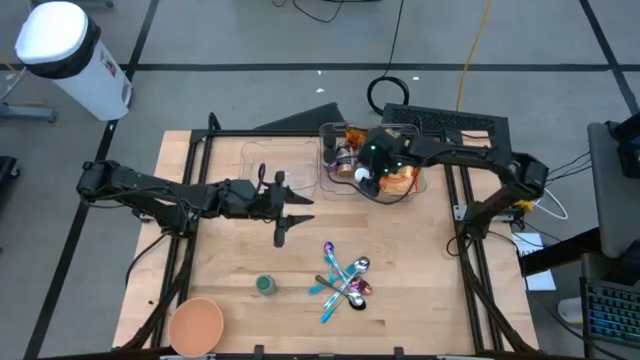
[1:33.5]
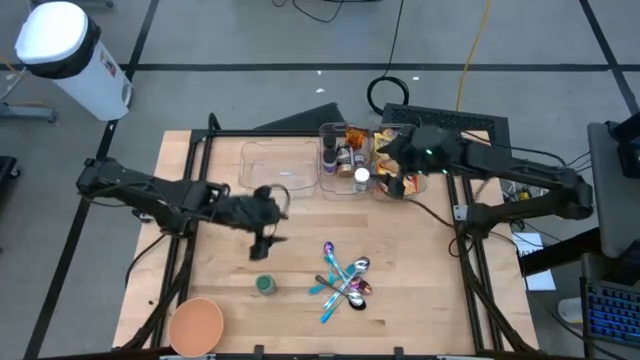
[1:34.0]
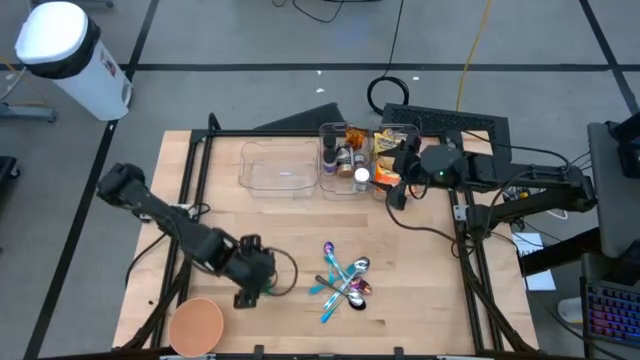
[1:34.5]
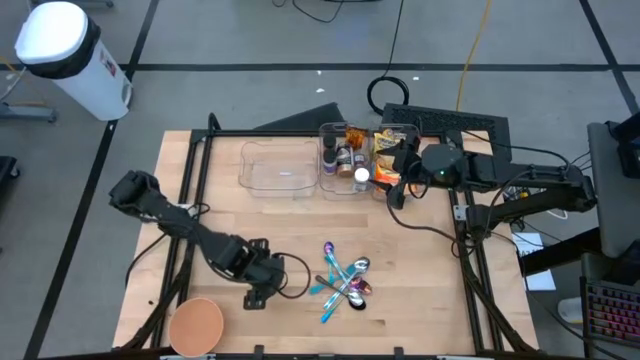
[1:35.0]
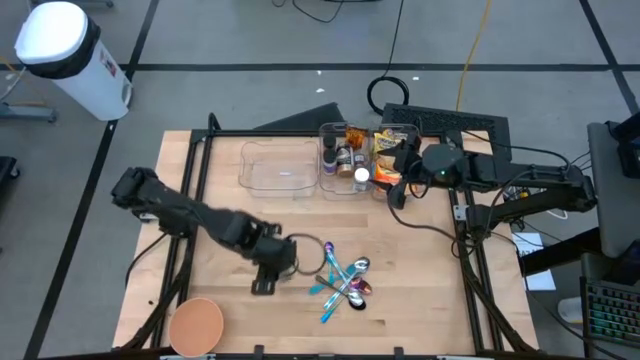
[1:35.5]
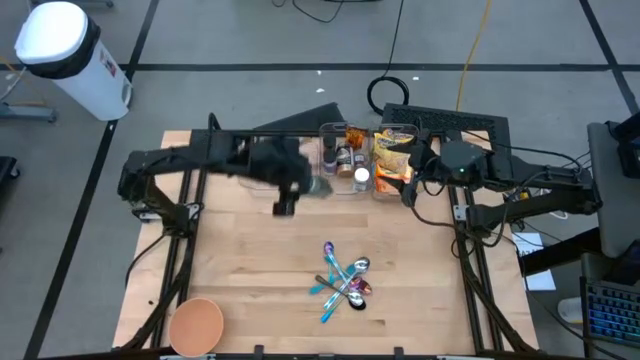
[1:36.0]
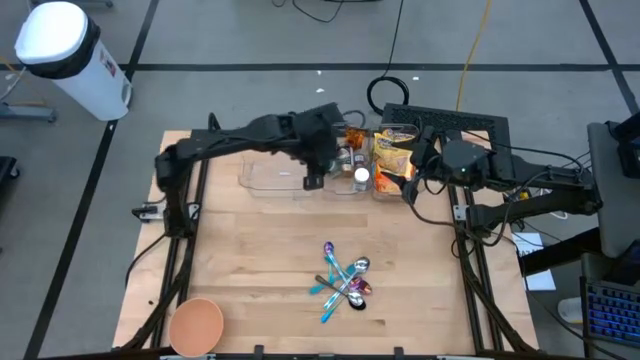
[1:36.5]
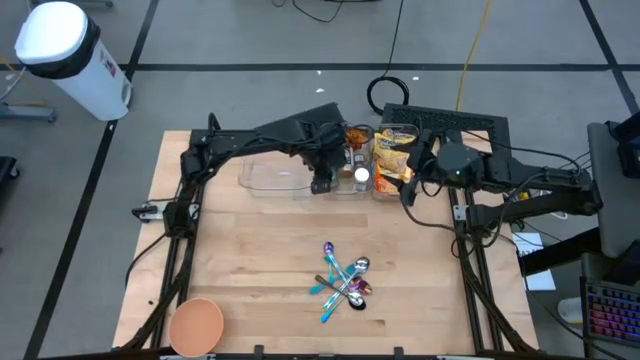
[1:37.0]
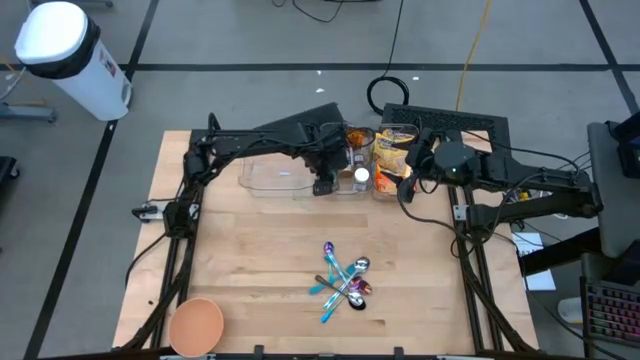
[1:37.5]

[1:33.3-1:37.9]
Task: Pick & Place Food Item
Put the green seasoning bottle into the middle transparent bin

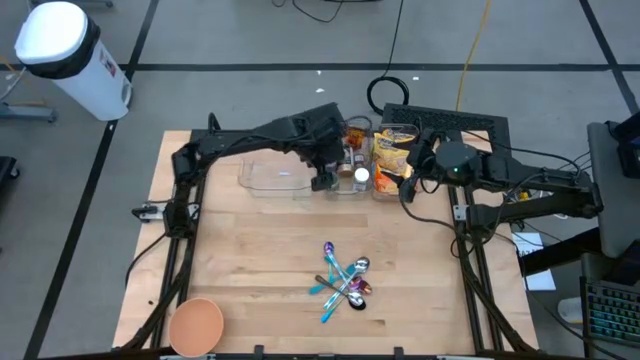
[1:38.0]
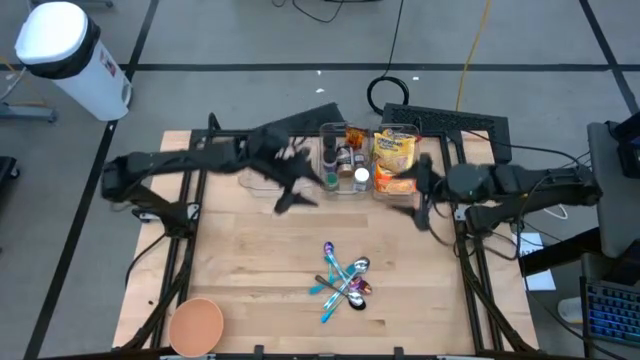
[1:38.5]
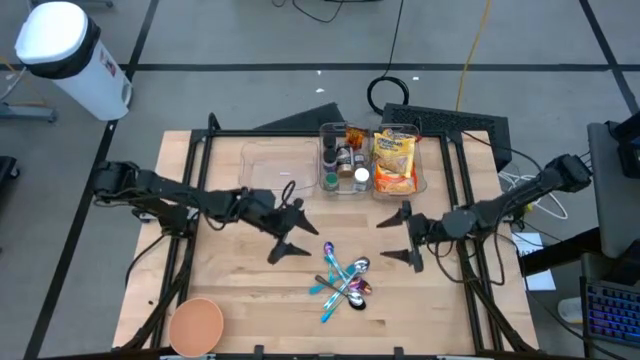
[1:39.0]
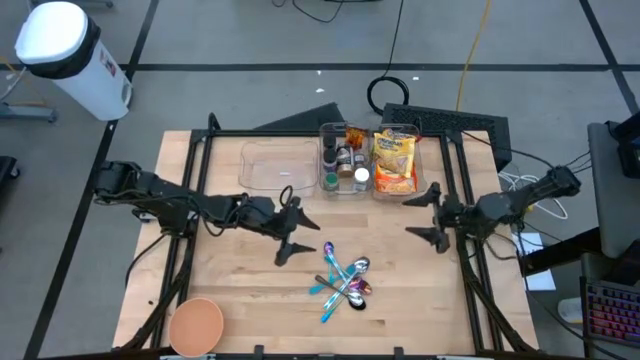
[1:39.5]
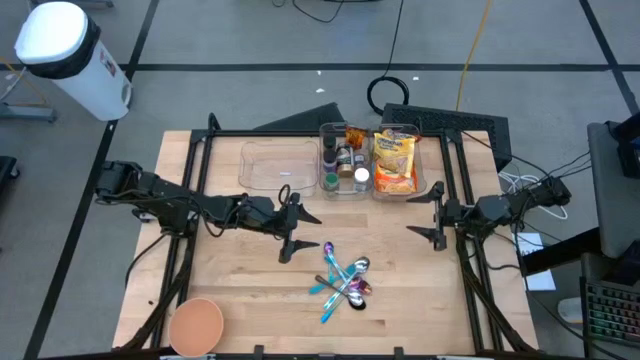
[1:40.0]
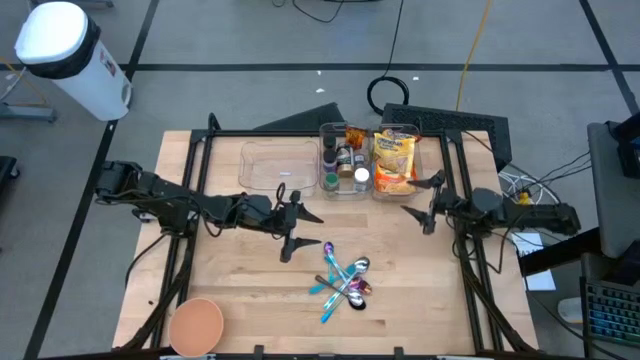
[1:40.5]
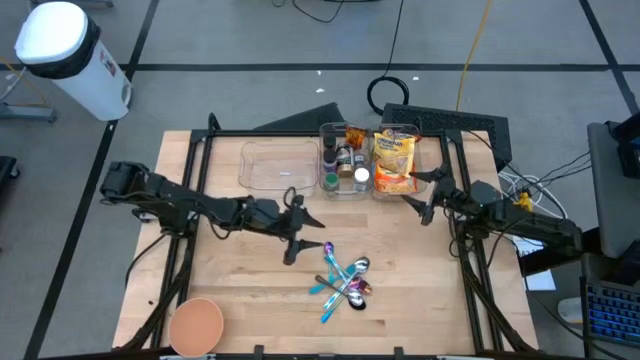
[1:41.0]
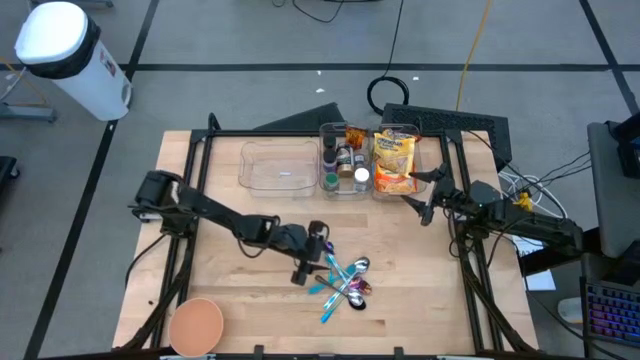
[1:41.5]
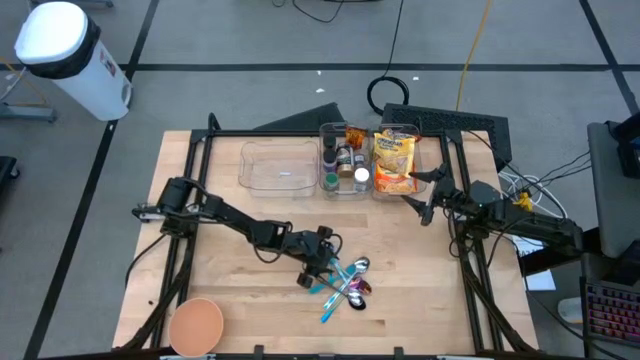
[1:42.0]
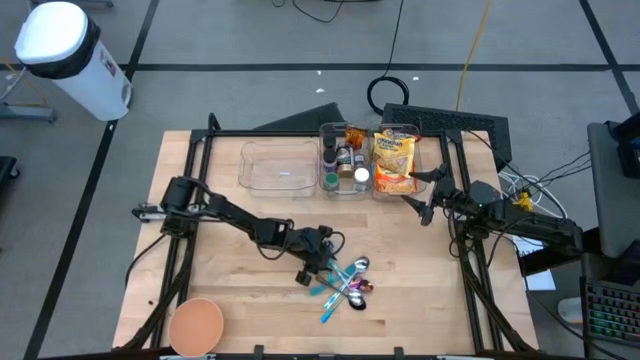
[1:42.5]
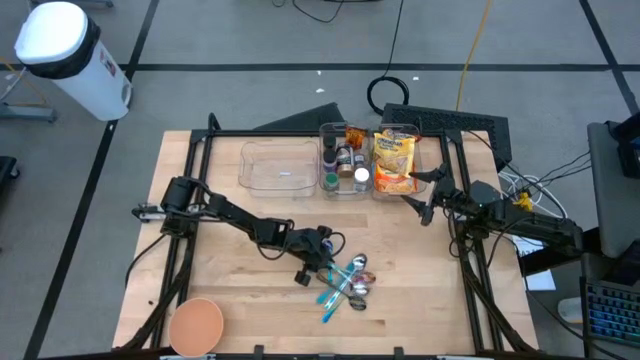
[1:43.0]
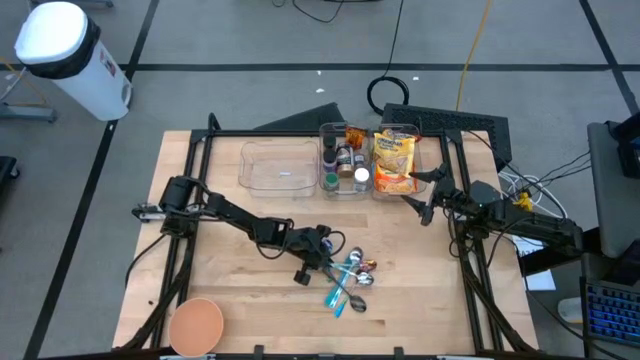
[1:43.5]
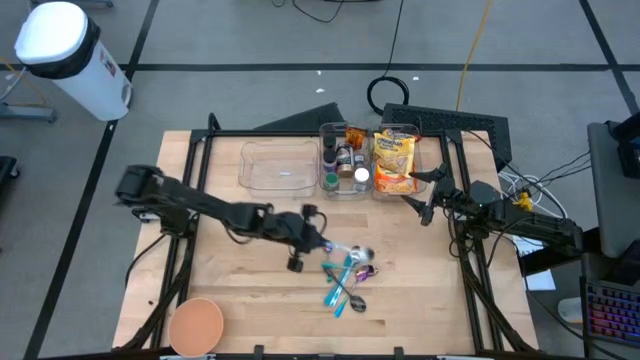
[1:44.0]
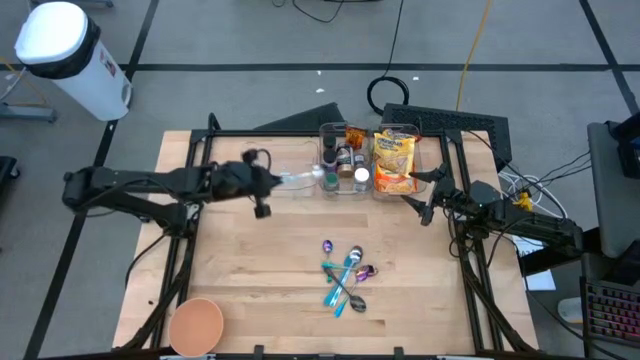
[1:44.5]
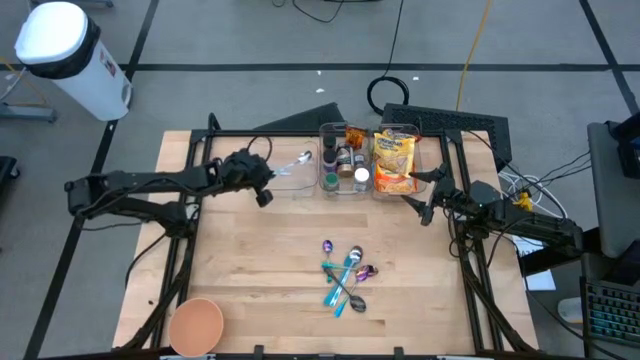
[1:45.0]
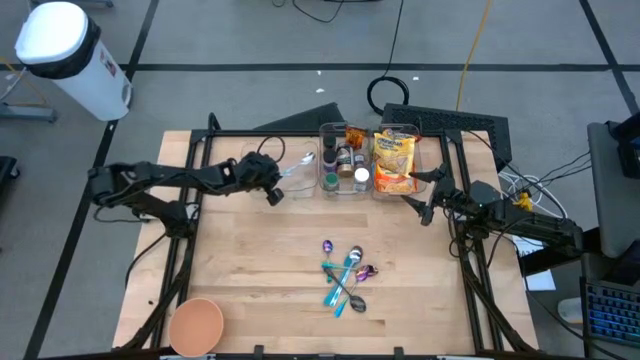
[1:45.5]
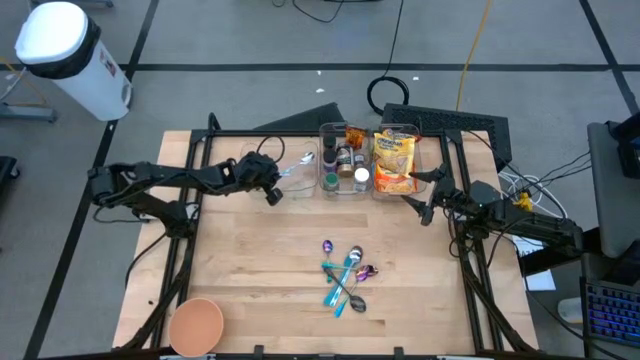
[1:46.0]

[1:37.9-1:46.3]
Put the blue and white spoon into the left transparent bin

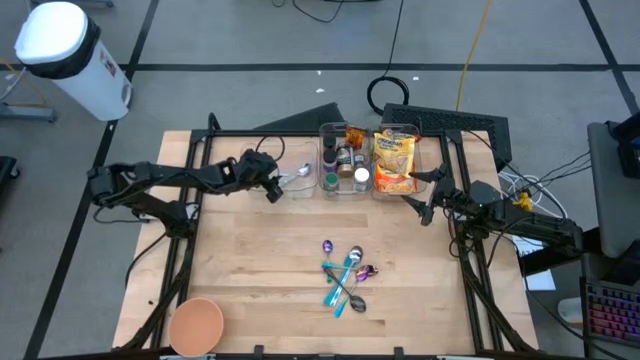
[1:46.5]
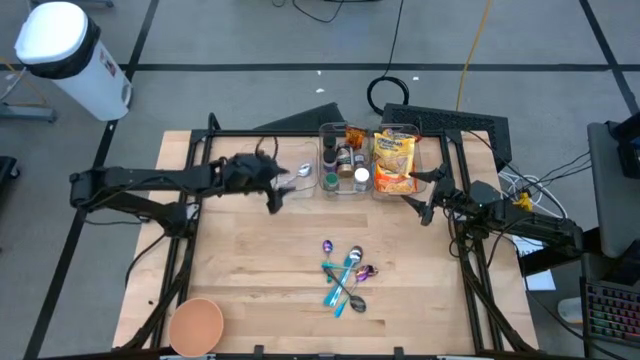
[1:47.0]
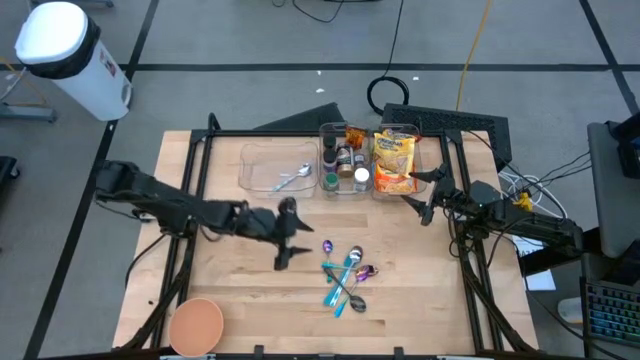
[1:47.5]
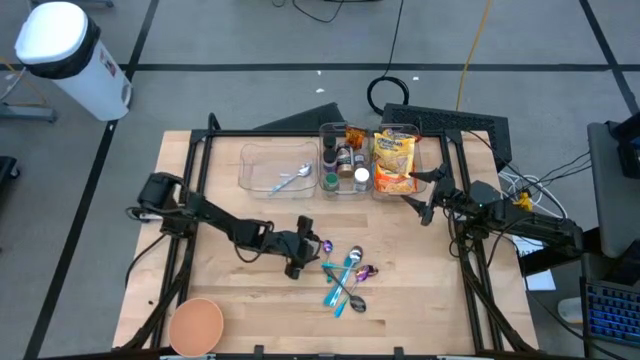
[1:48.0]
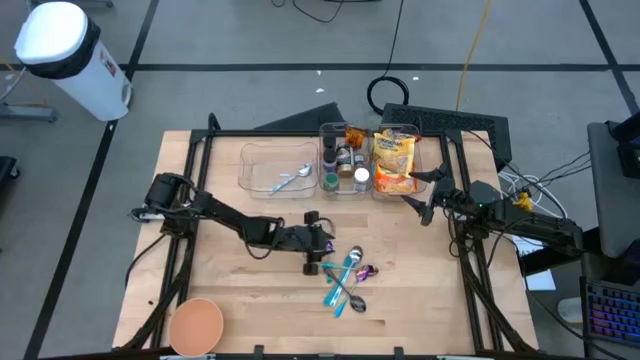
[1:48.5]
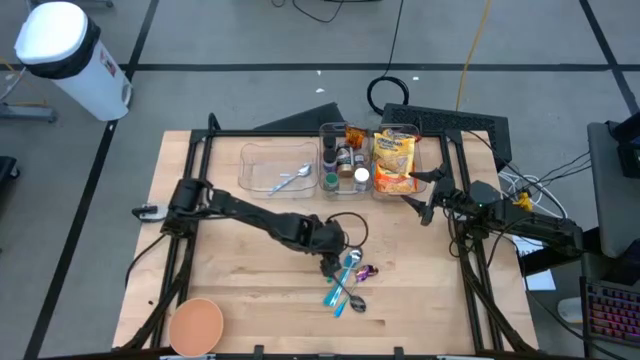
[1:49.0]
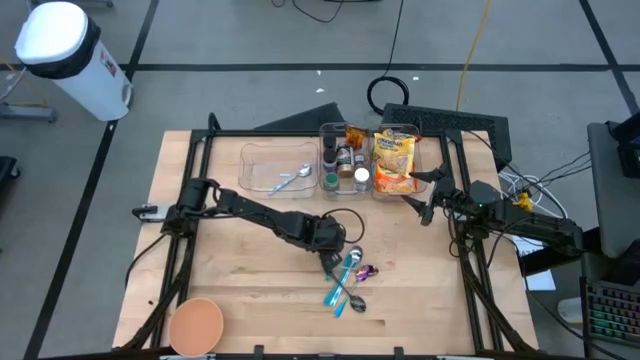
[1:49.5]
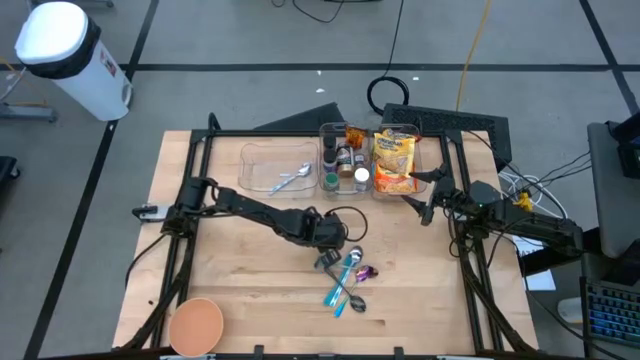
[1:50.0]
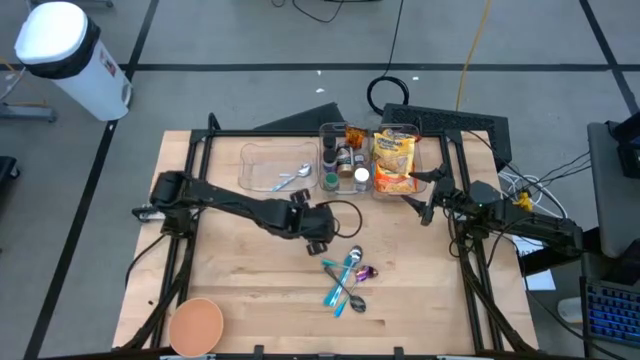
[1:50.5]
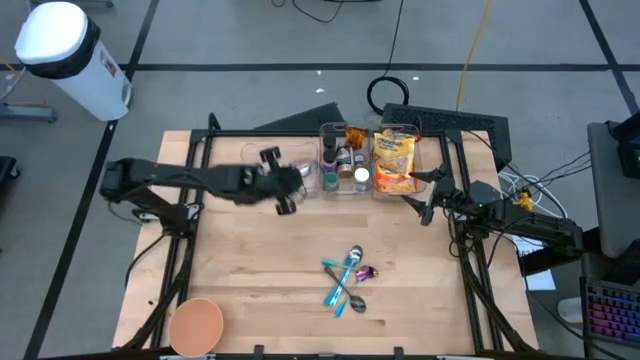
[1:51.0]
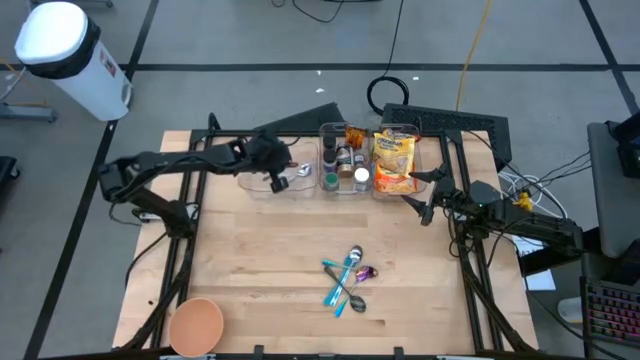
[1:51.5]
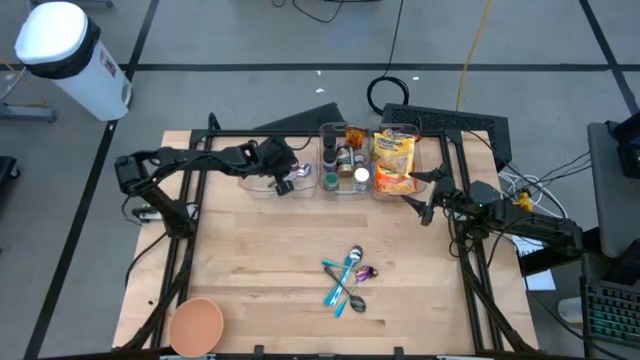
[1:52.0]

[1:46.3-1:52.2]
Put the blue and violet spoon into the left transparent bin
